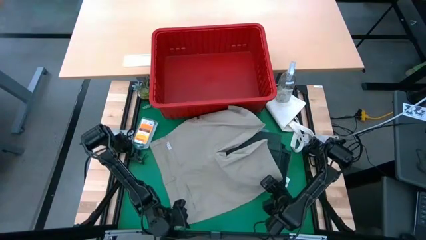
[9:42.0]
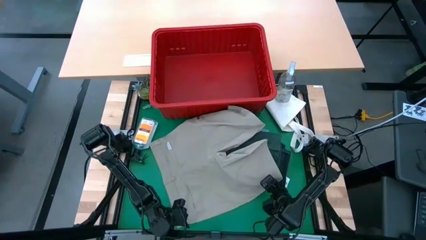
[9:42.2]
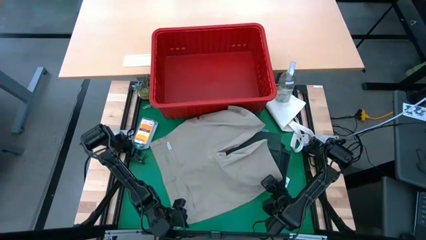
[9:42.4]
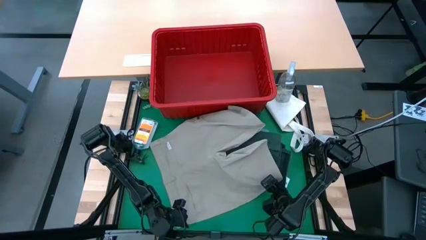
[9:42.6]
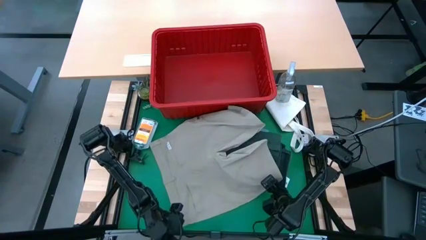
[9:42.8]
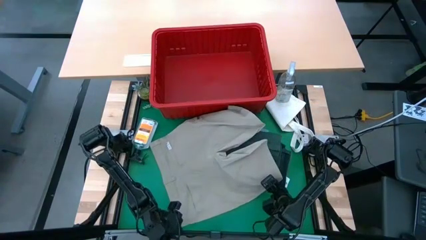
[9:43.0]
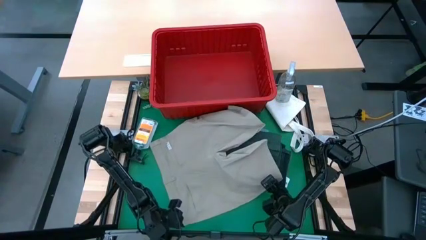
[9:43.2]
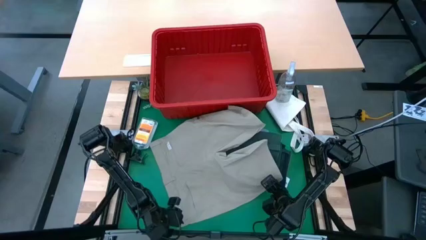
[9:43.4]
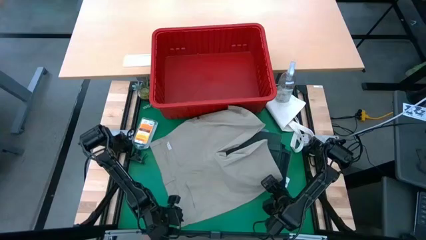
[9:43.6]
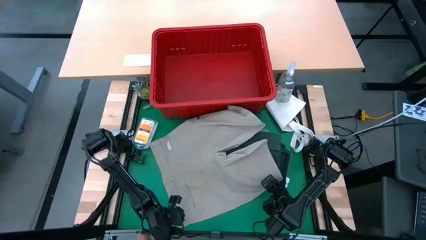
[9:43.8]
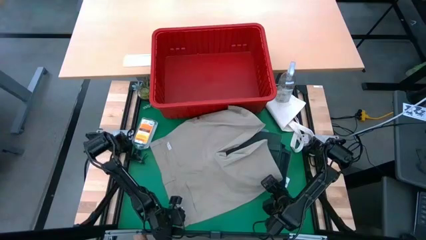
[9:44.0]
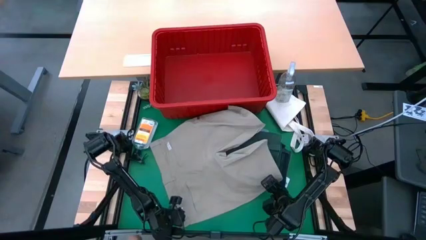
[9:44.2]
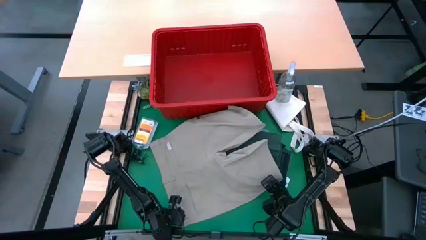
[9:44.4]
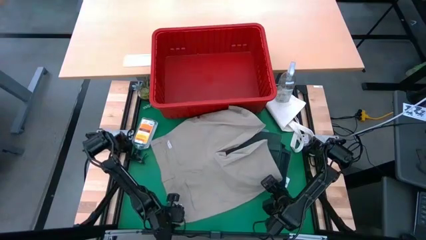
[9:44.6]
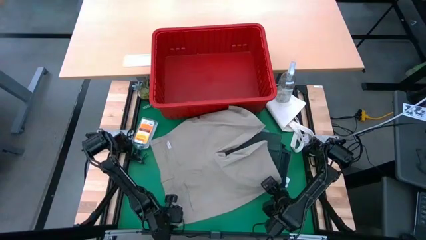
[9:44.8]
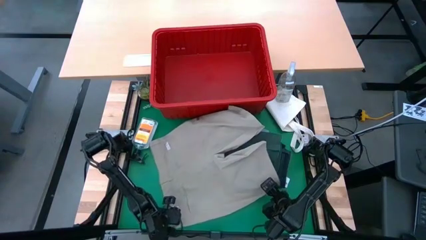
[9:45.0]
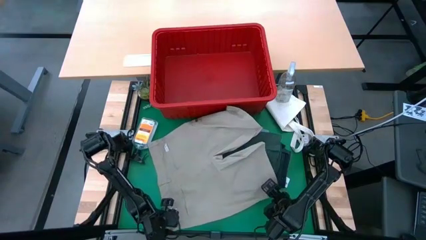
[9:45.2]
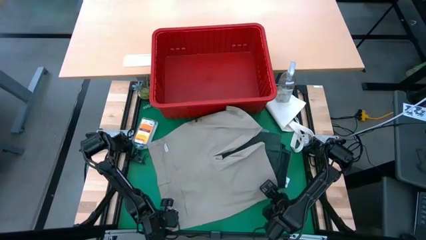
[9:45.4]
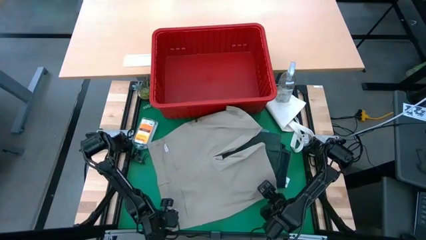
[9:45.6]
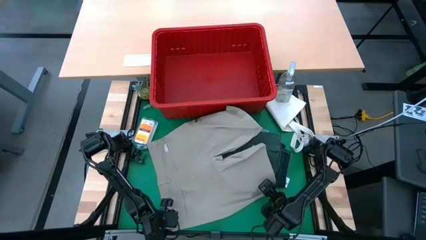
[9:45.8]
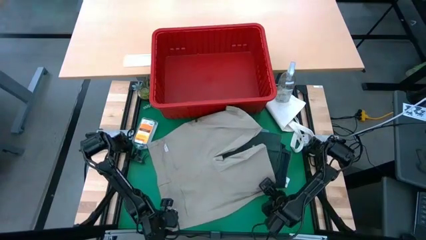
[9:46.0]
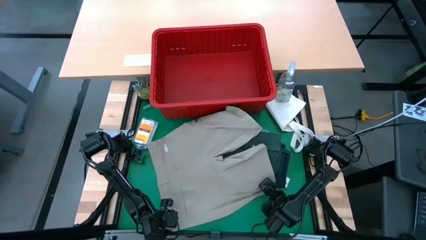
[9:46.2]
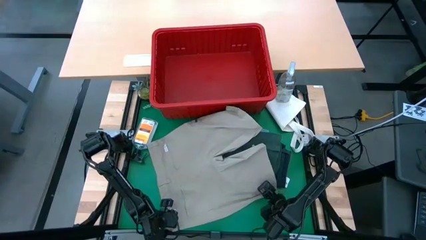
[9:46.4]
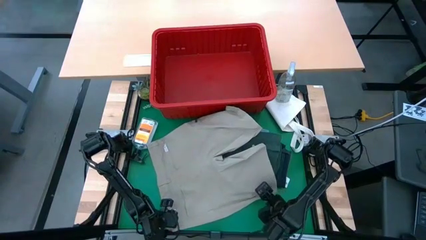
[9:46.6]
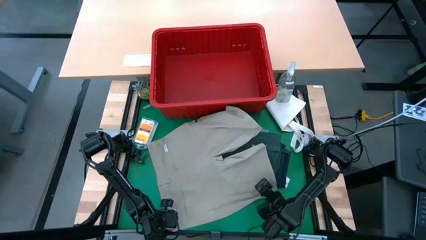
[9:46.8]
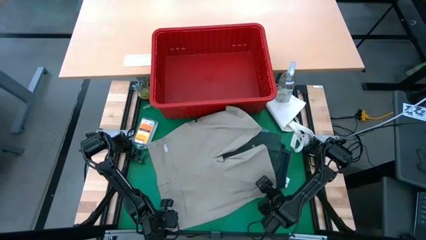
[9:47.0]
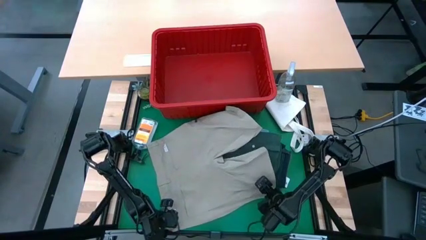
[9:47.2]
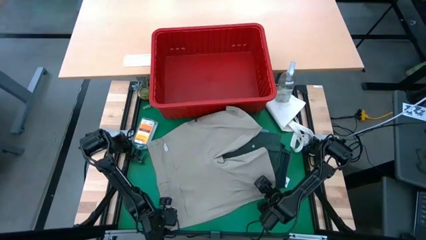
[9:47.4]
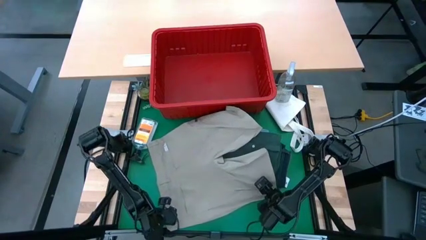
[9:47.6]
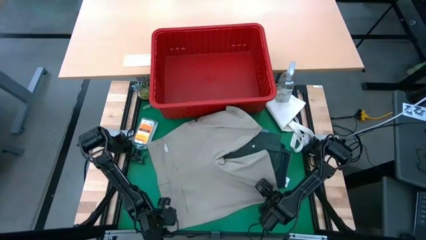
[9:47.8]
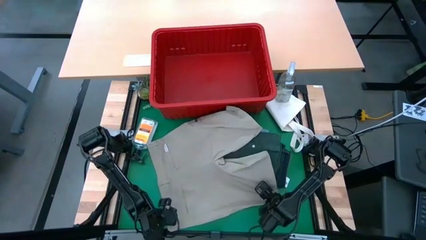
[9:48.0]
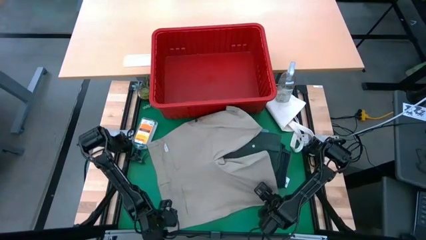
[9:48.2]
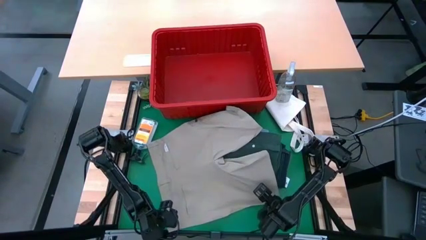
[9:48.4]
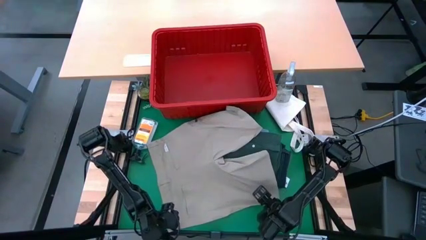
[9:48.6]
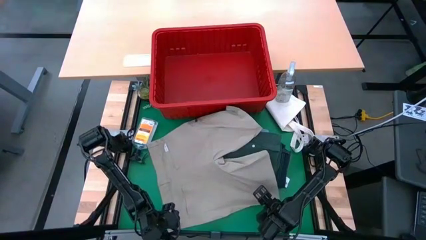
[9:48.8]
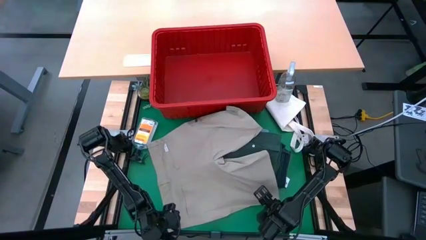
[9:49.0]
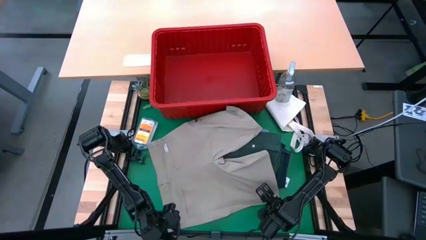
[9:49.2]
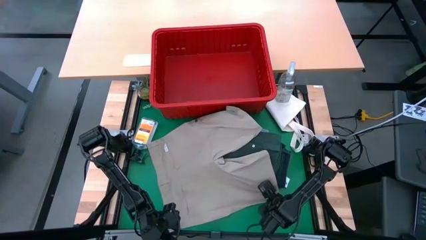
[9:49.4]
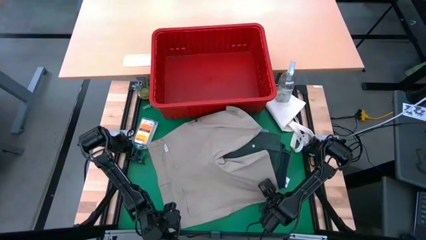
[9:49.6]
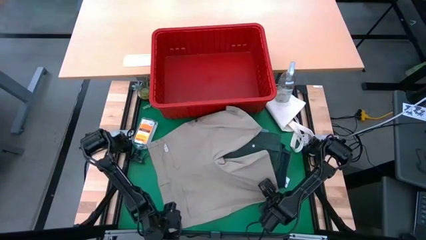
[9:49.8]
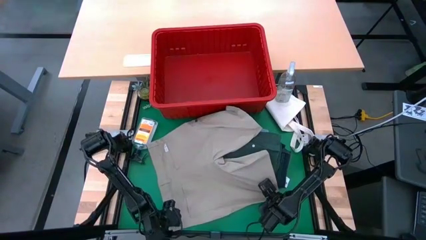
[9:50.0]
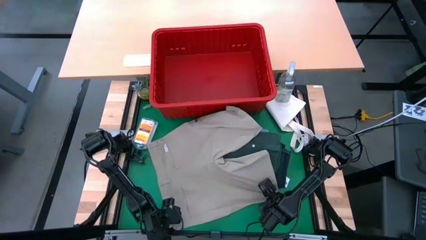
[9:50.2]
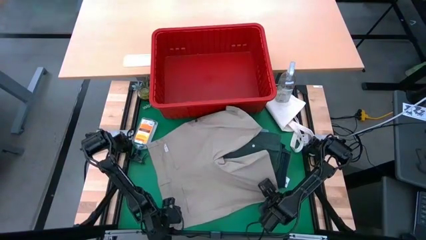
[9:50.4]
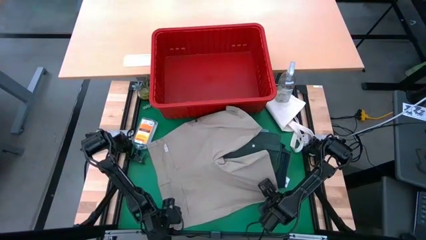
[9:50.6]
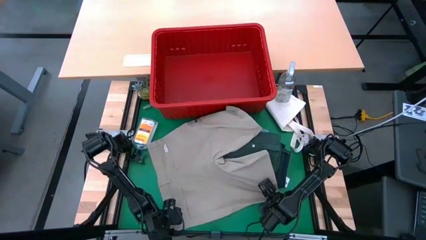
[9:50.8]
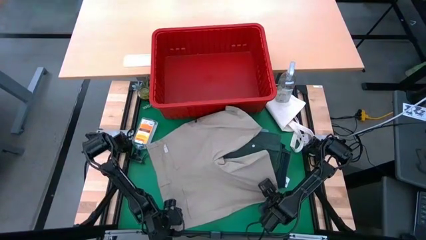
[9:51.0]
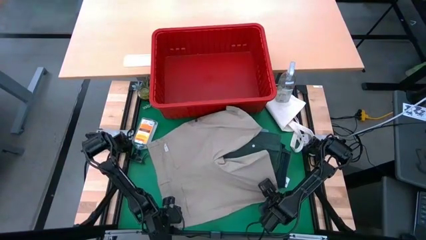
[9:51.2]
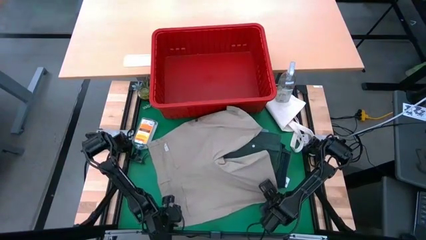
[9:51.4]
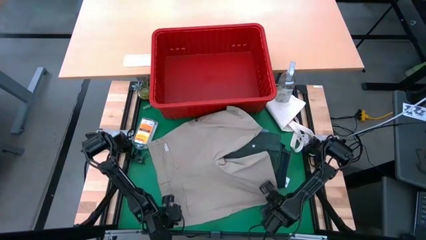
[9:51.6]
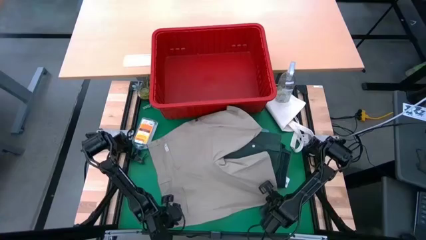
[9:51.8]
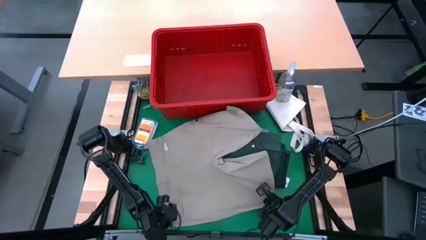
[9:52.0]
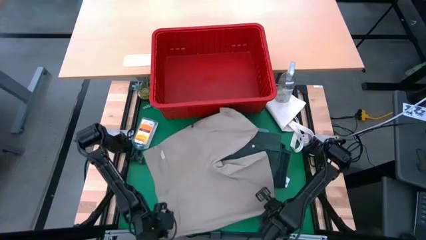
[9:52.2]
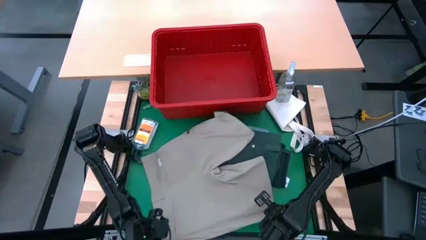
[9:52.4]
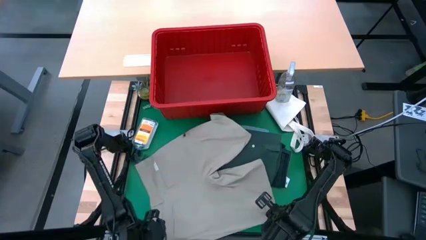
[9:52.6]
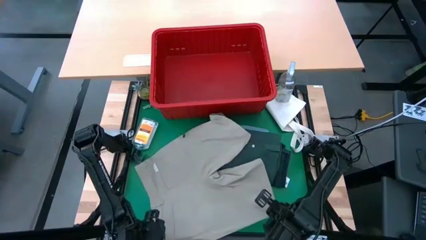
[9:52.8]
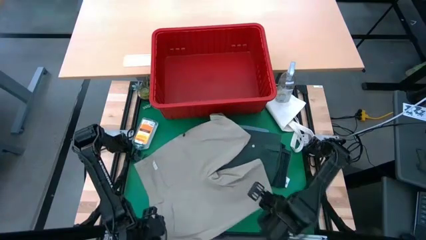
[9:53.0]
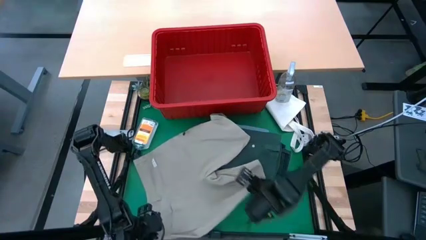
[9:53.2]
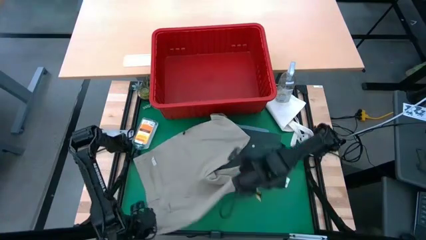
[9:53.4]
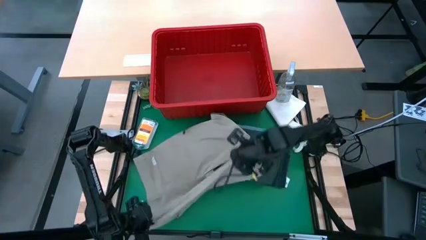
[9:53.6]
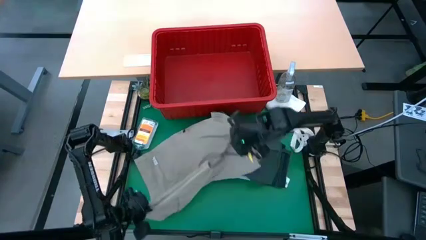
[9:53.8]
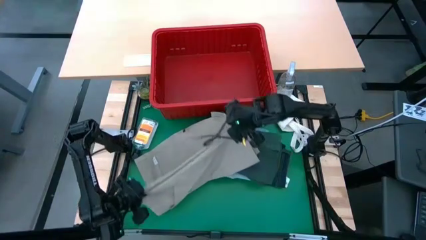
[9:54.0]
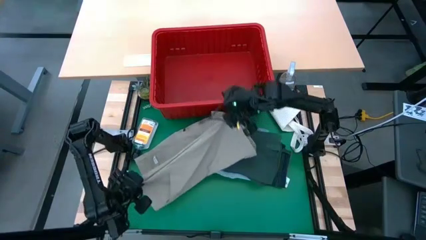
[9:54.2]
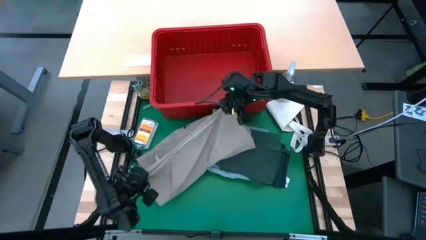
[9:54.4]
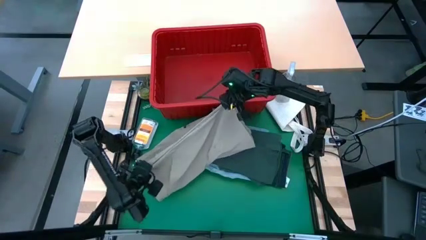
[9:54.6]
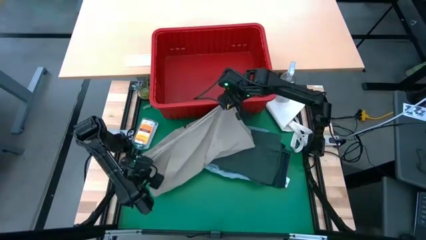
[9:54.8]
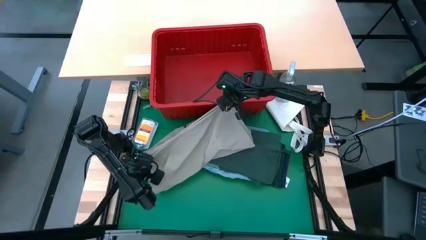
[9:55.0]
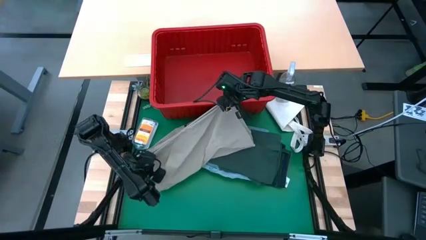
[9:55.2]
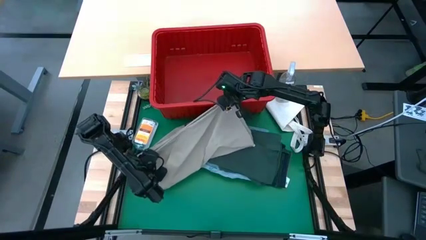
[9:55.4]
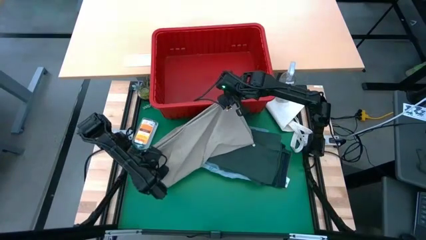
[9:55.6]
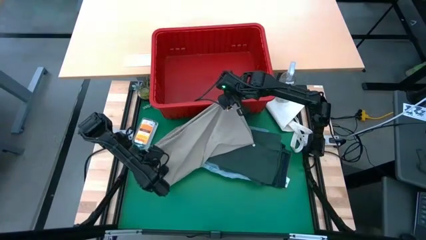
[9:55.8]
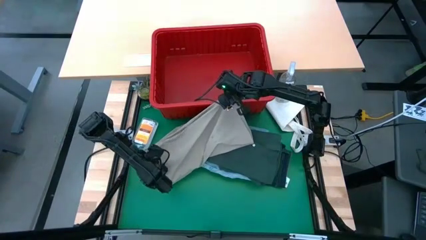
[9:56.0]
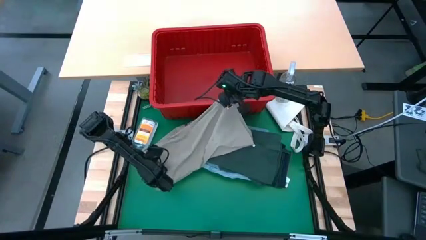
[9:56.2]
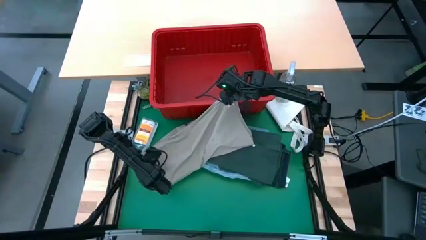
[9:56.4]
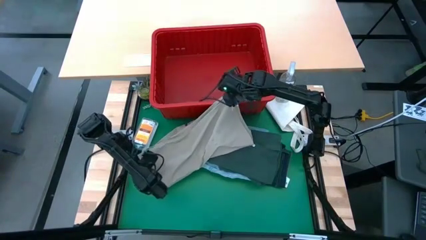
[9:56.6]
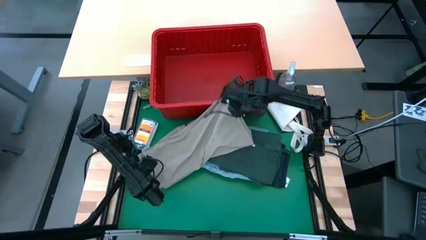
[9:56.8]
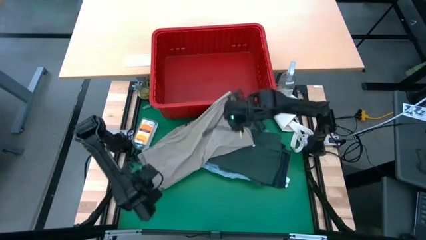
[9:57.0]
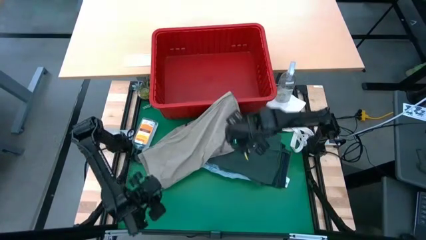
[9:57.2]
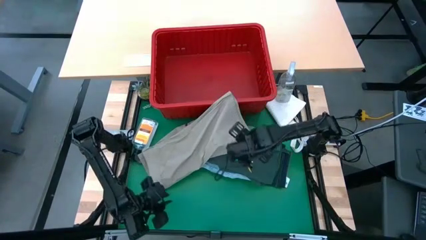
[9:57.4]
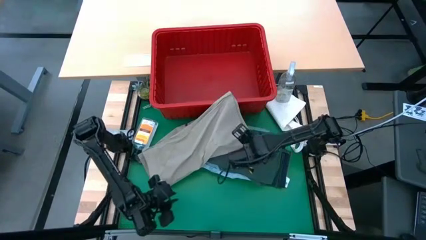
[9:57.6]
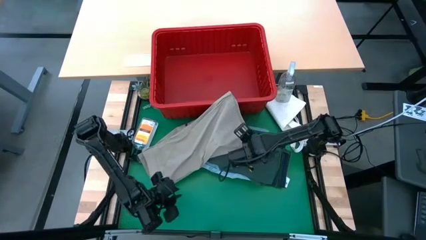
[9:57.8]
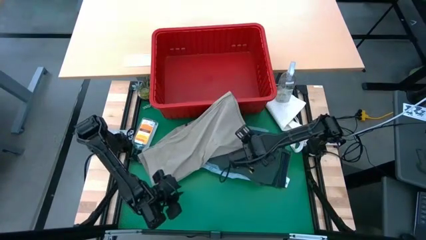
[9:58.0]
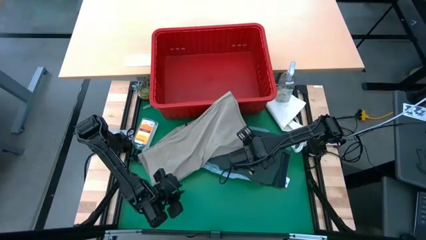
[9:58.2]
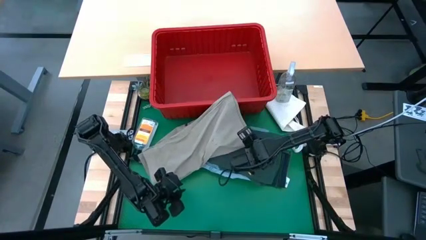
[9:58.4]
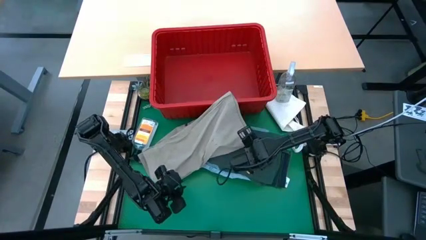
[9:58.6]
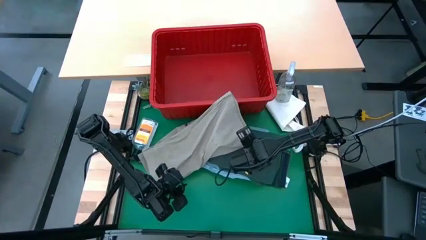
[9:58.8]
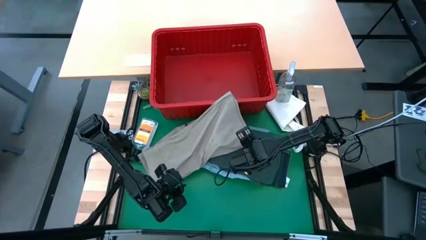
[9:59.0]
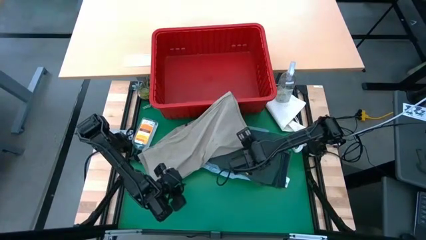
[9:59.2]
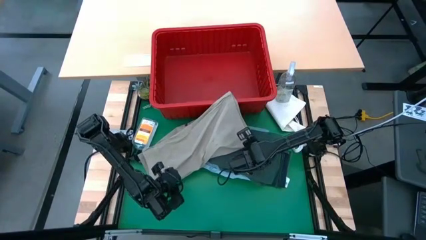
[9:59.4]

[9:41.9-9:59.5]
Task: Fold laundry
Fold the beige shorts
